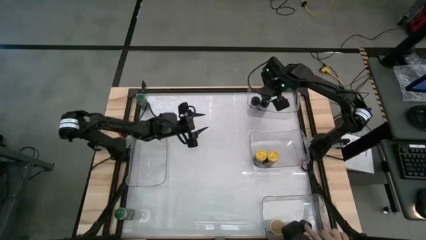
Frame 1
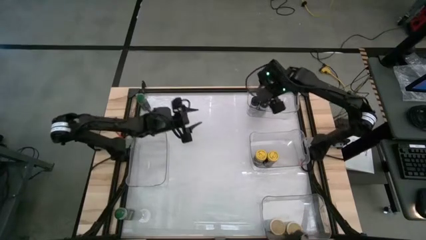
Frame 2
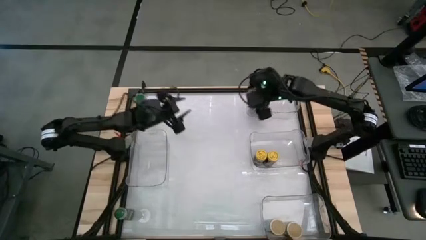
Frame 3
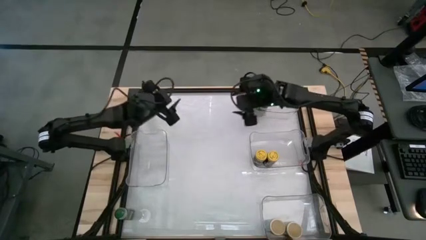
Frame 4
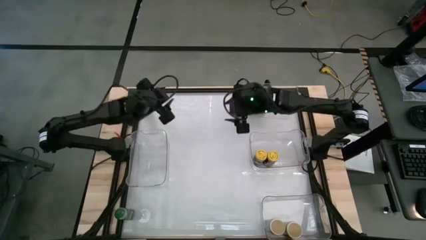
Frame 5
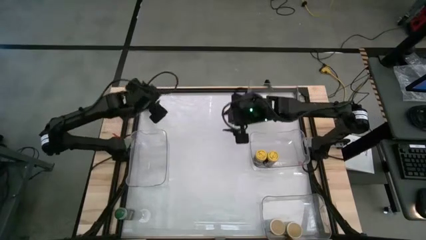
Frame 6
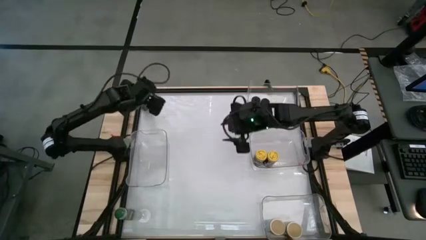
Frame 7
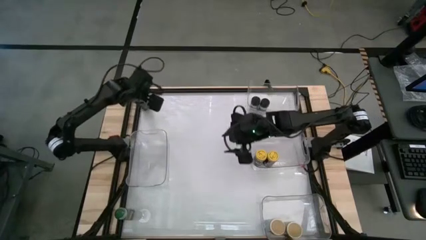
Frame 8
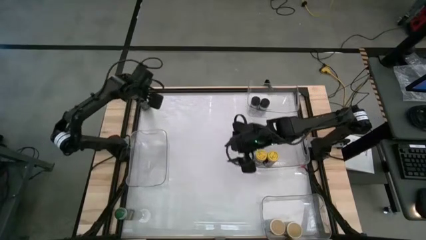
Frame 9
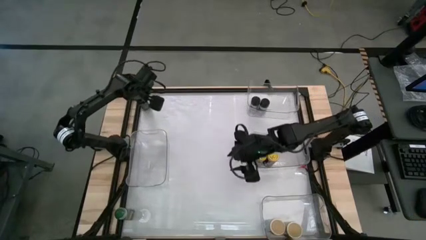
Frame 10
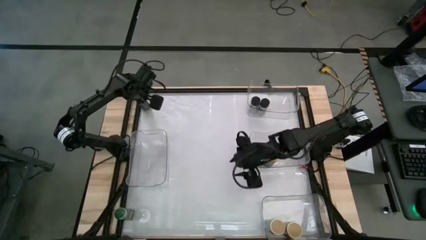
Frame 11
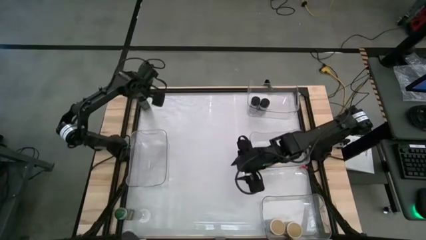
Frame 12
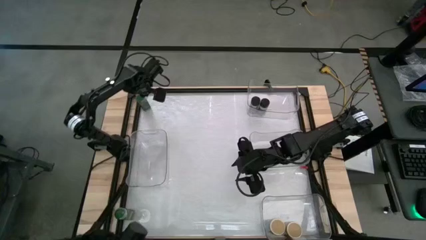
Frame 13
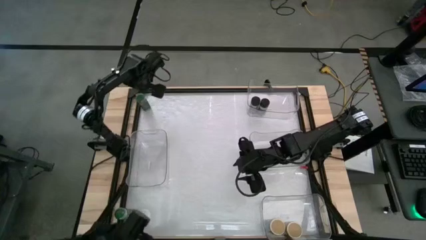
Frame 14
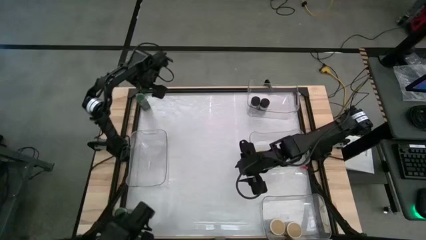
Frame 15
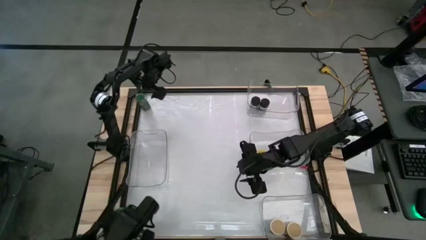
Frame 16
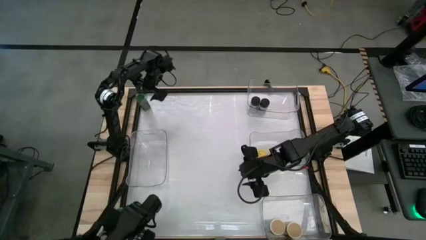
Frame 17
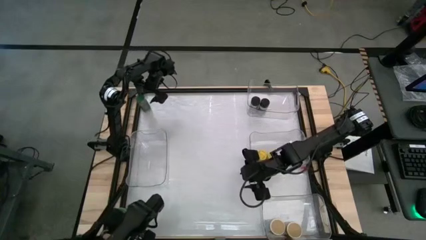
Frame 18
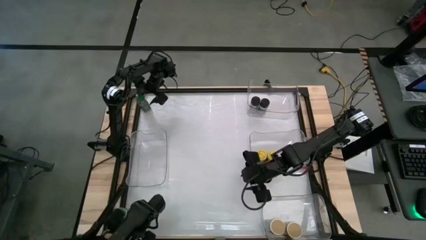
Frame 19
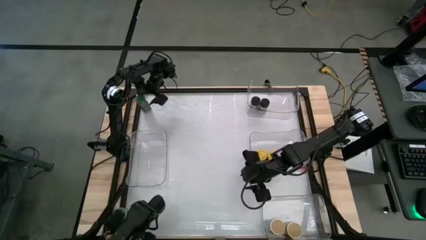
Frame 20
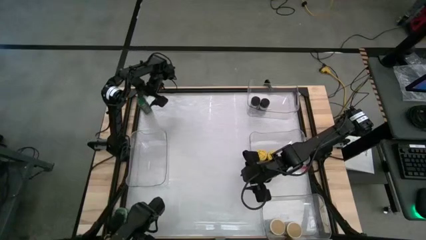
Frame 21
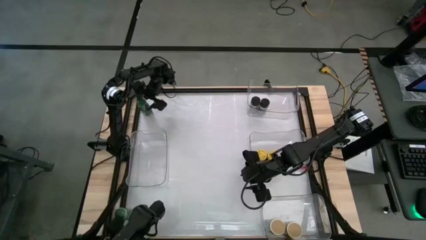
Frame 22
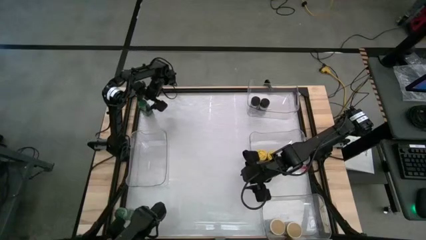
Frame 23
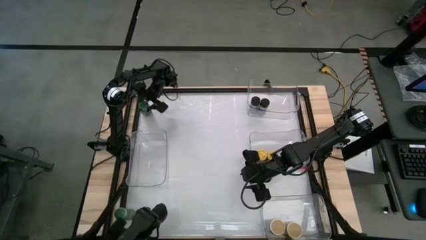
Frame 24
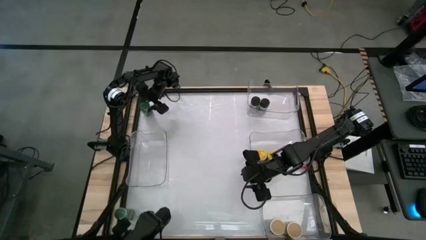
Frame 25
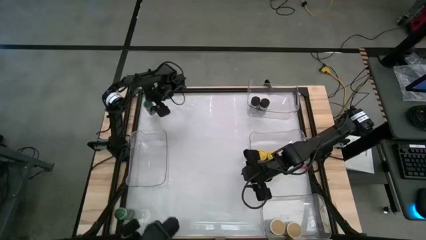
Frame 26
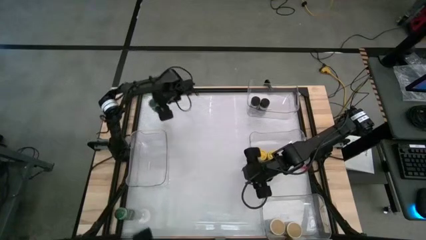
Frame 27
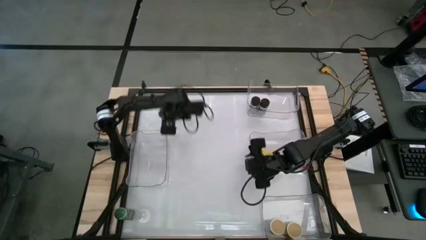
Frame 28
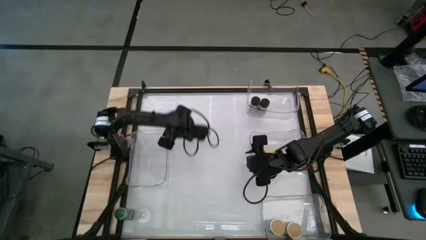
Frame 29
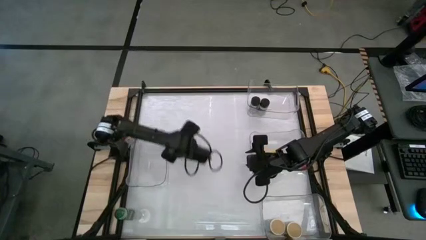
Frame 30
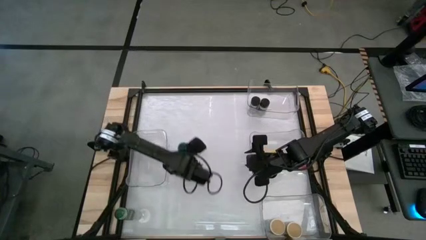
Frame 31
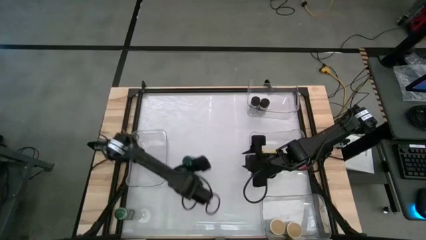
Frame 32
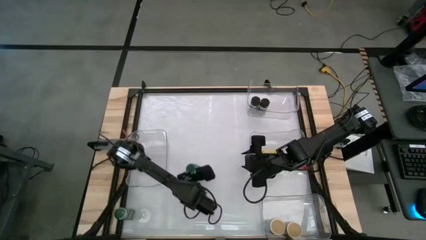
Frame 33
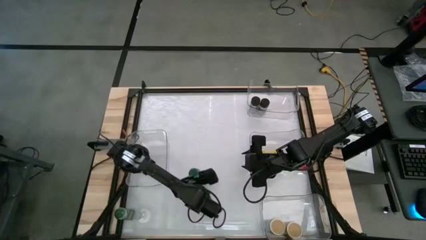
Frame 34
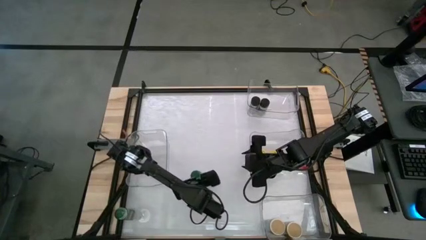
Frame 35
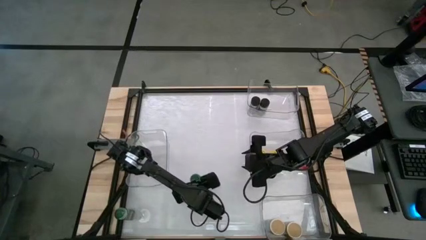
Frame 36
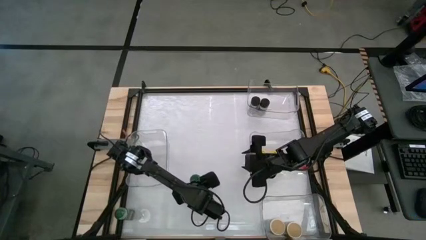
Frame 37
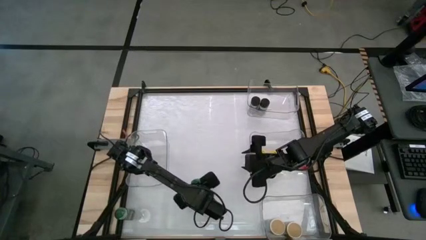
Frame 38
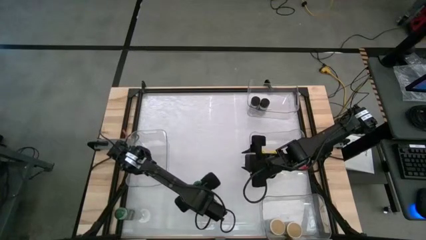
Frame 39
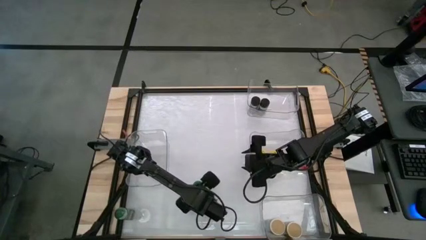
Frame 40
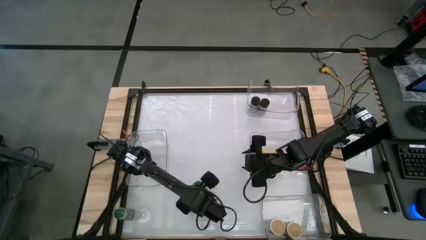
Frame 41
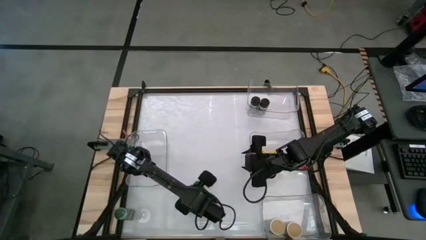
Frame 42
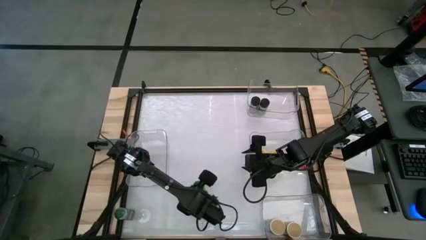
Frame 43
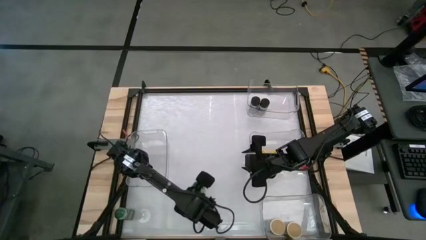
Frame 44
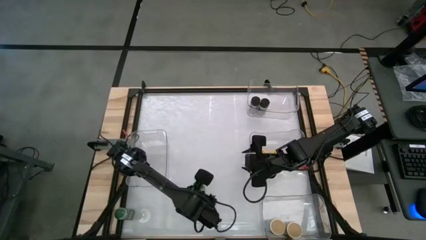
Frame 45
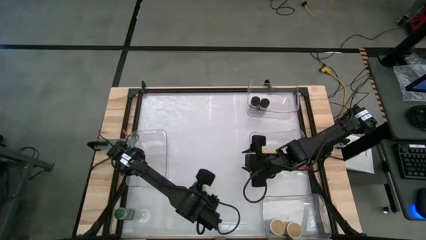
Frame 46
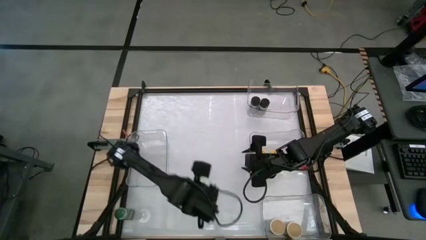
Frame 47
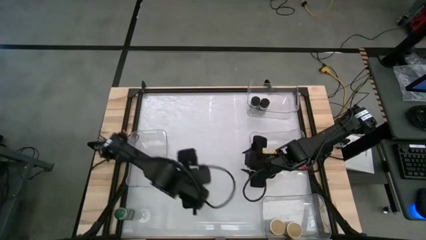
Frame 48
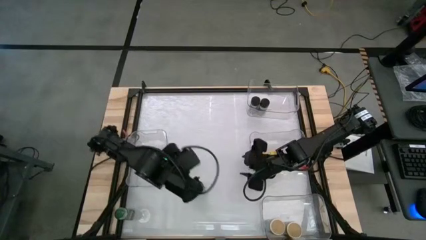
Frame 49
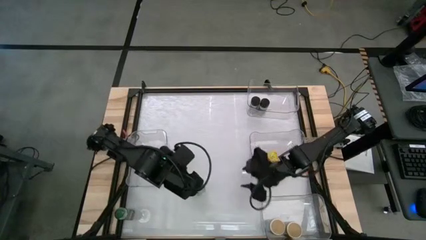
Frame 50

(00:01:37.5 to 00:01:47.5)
Task: Sort spices by type
Put the top green seasoning bottle into the middle left transparent bin
